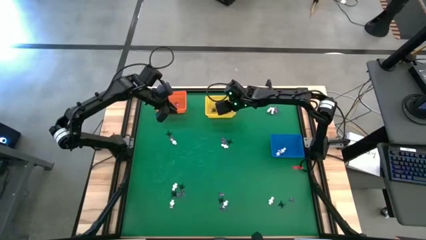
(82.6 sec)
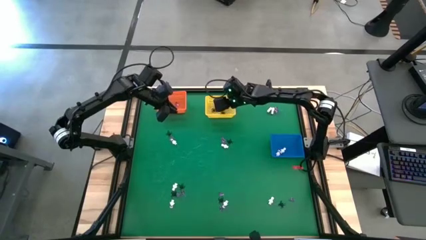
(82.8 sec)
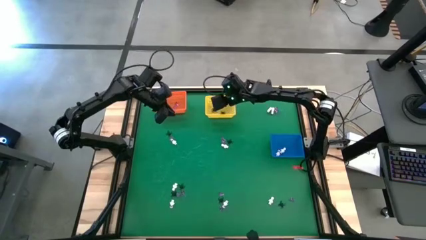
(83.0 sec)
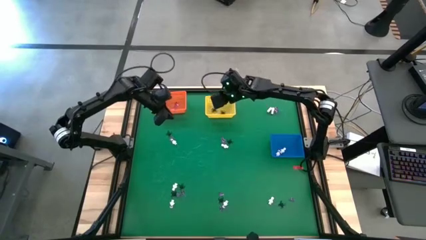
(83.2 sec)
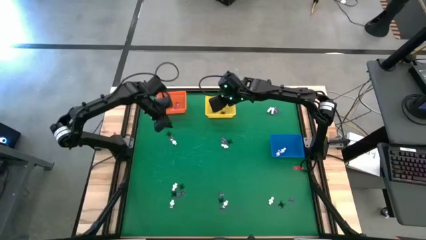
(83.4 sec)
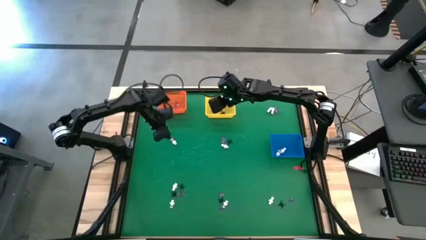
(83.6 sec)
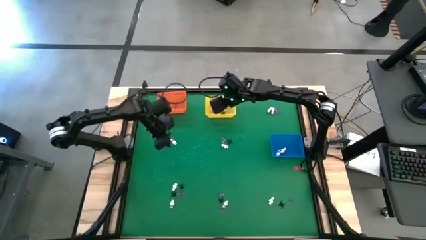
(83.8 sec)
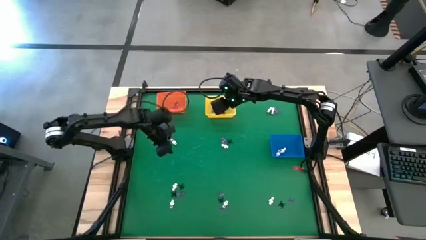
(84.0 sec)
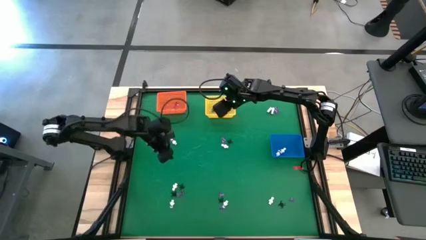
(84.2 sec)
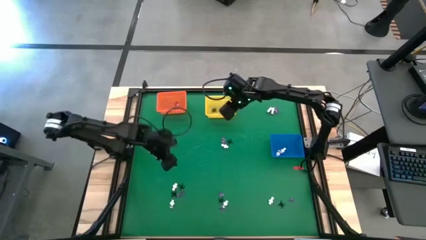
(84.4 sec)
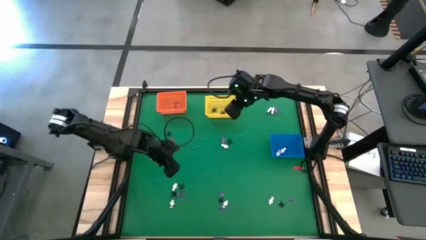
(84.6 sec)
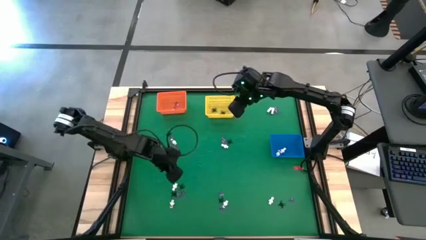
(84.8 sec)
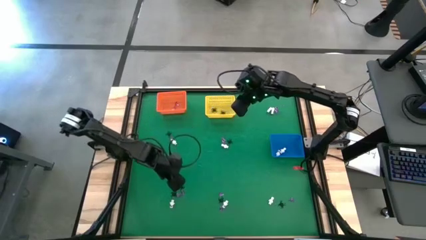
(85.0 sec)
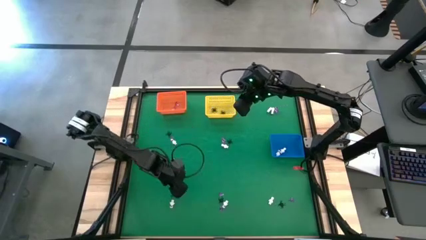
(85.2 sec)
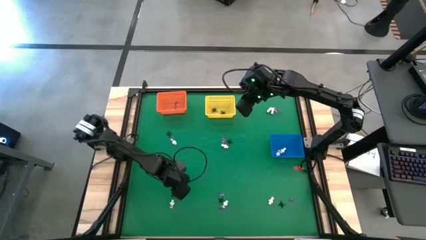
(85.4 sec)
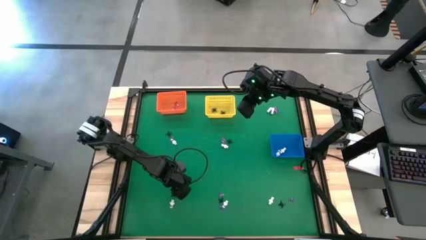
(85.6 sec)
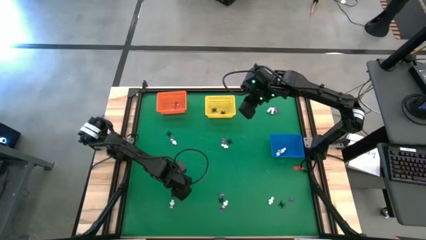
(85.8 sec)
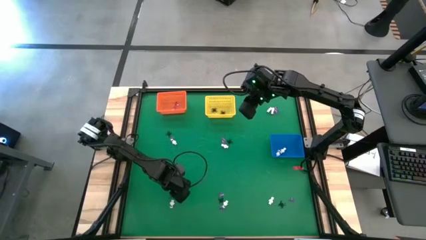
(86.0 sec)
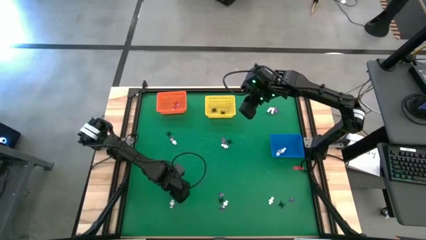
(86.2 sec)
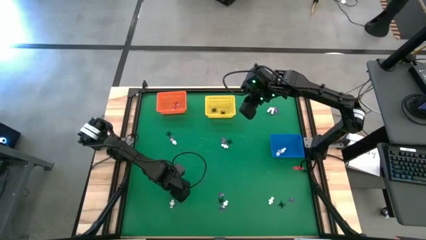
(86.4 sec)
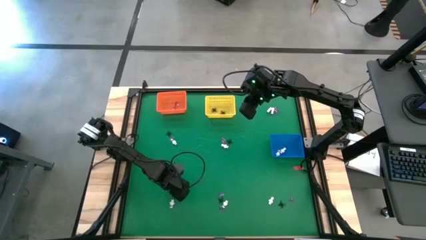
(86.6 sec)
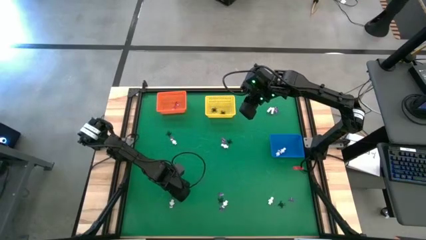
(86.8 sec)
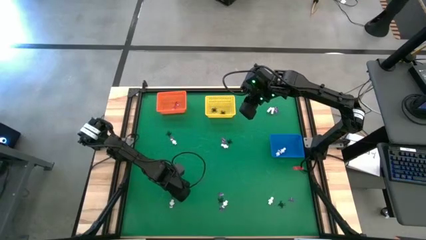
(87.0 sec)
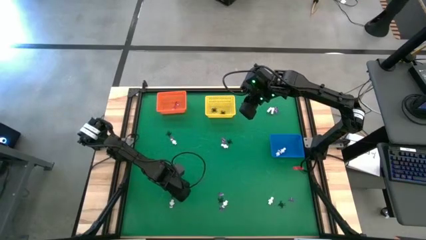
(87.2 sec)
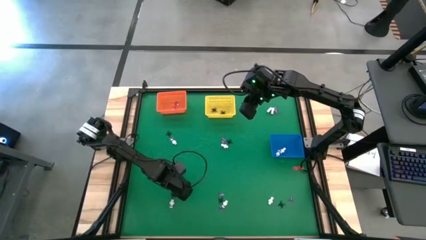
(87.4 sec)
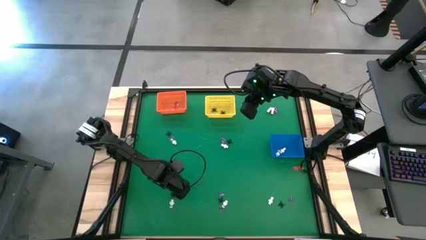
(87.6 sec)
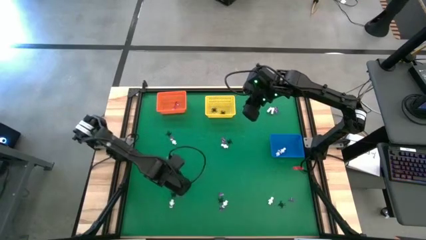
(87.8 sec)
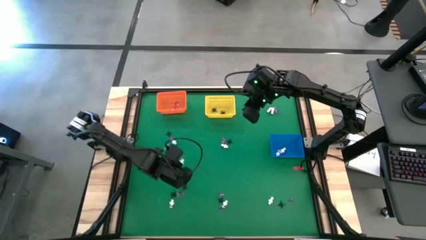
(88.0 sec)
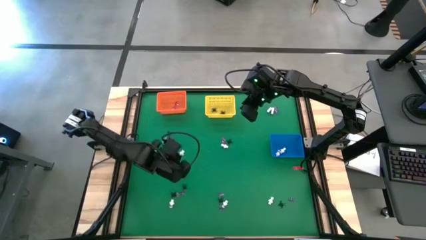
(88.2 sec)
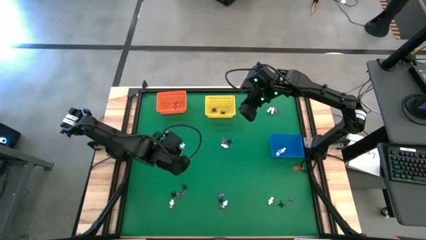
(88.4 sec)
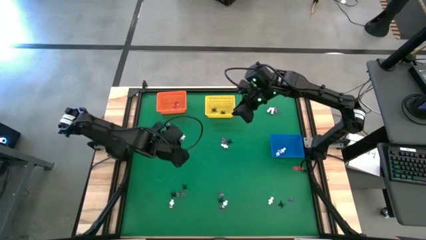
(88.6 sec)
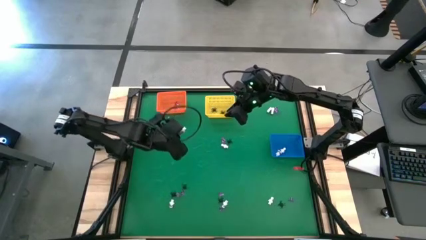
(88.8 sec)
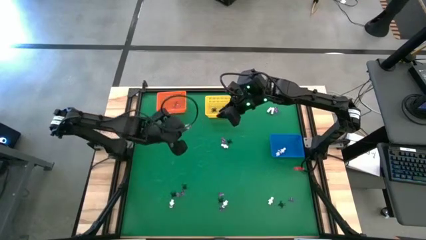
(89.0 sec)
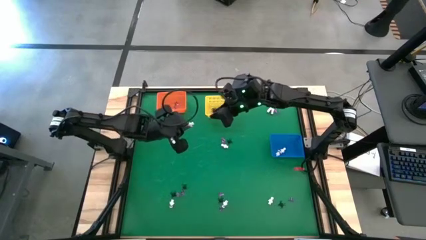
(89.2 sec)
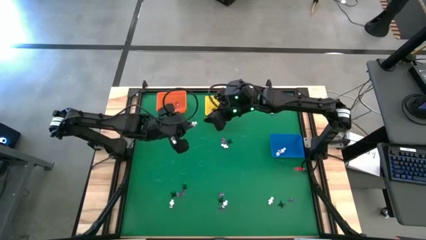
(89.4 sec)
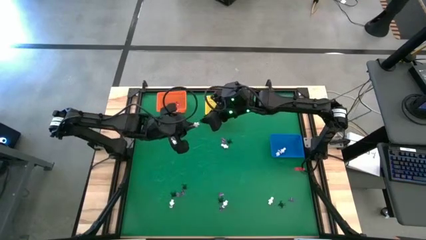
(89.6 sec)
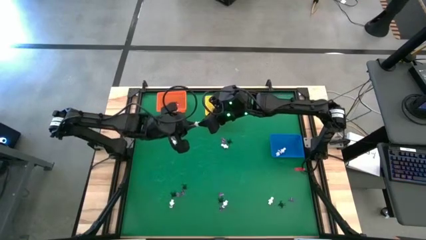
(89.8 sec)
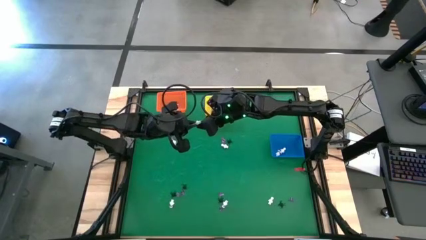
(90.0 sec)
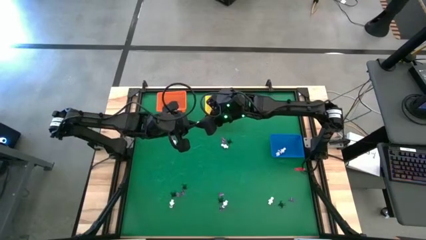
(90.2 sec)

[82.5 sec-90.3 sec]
Task: Sort Halloween decoration
Put the white skeleton toy into the blue basket

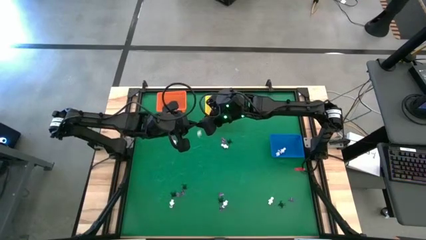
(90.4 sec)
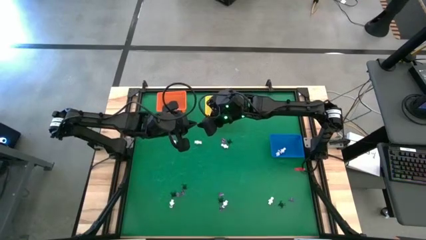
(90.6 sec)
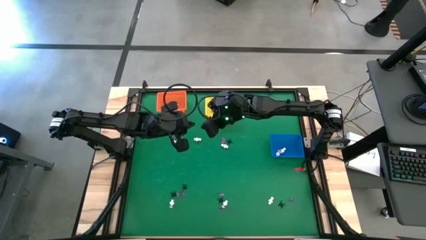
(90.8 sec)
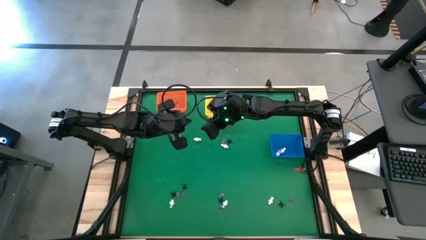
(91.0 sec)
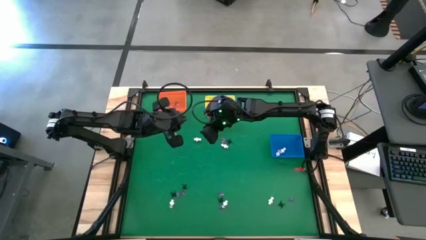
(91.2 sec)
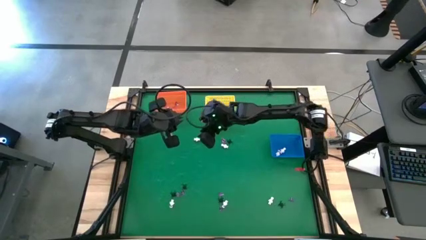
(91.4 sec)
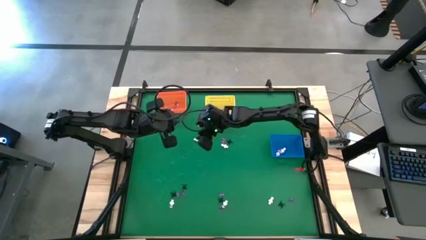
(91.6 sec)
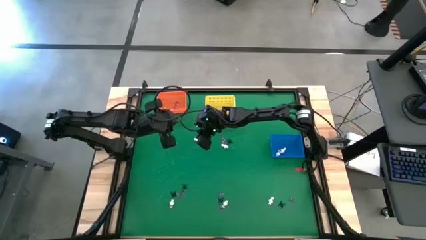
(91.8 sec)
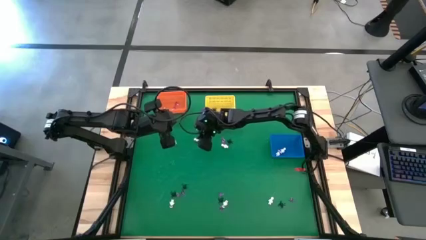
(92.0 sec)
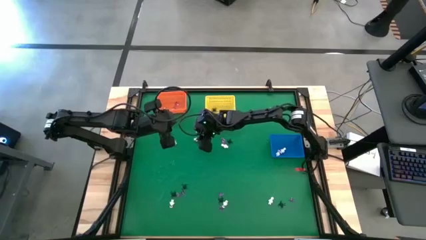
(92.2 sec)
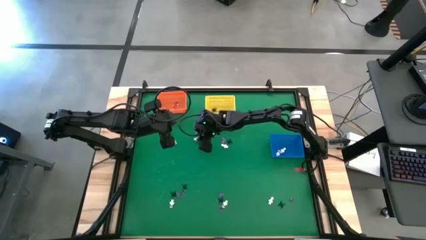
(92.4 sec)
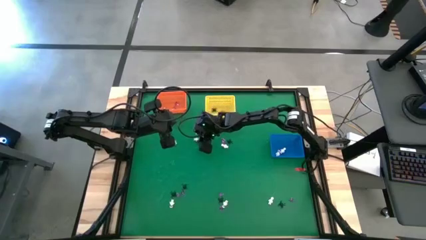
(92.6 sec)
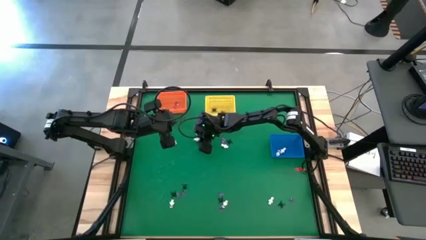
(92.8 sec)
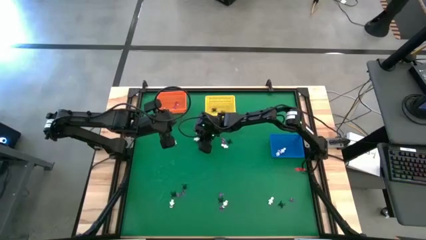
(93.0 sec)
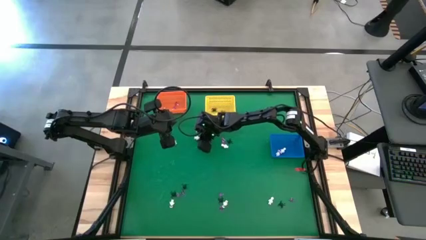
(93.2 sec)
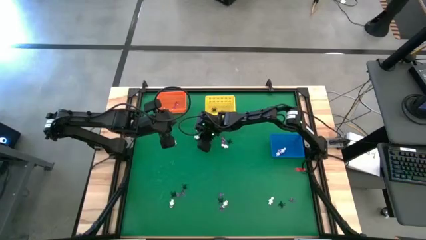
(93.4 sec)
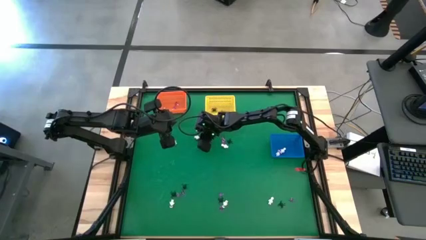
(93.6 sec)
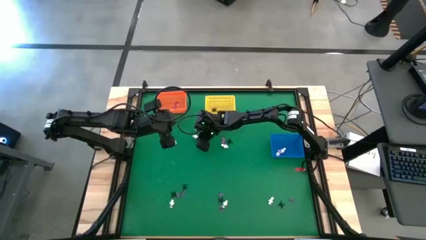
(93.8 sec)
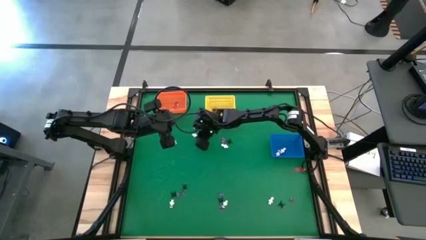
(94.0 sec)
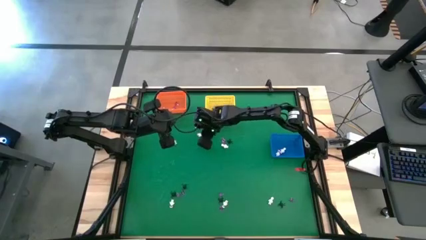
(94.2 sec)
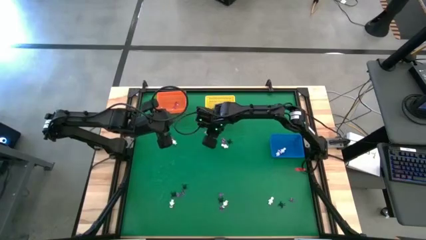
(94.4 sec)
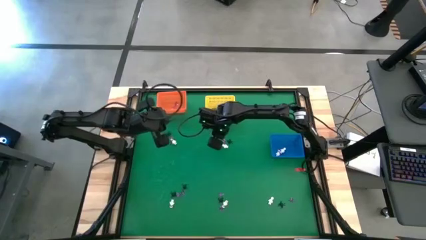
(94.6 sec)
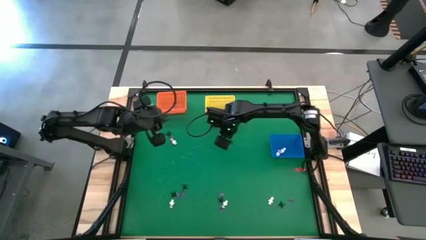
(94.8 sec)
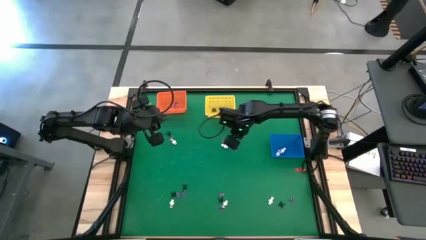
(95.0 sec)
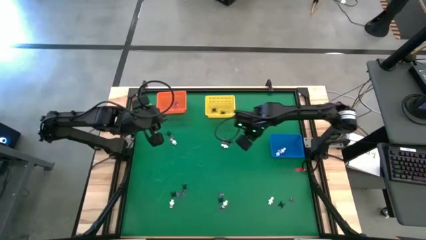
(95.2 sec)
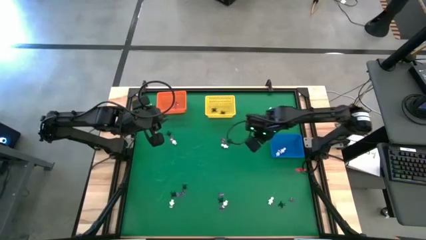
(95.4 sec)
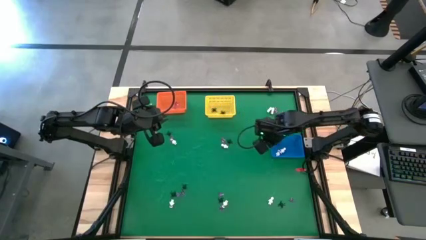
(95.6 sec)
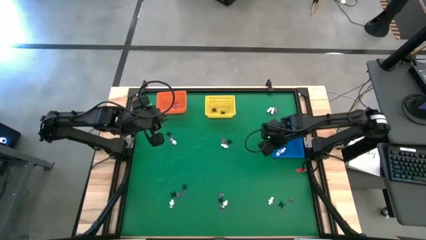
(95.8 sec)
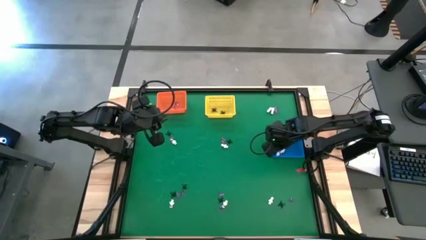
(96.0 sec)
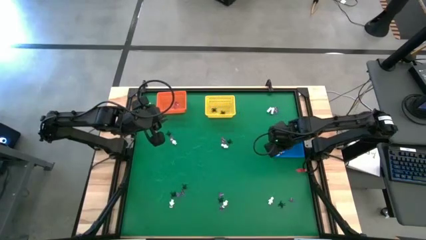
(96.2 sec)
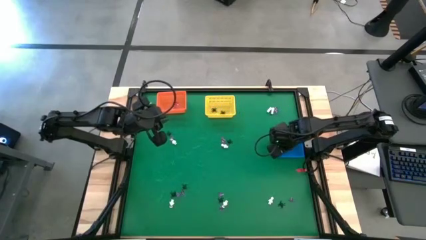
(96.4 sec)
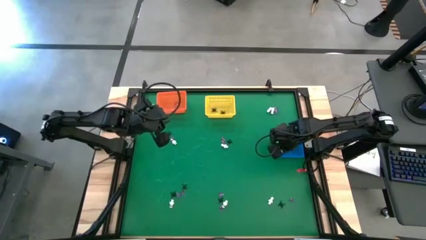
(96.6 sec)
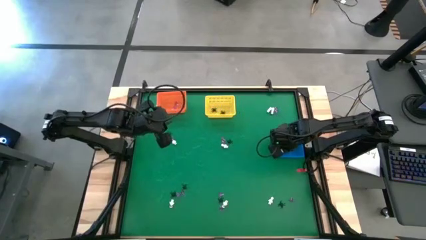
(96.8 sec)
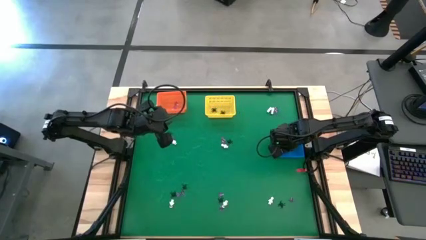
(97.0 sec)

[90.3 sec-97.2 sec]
Put the white skeleton toy into the blue basket

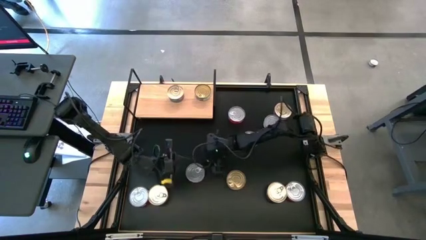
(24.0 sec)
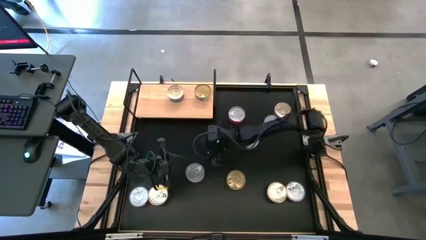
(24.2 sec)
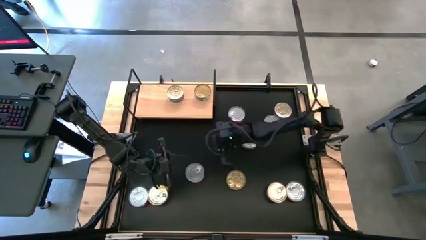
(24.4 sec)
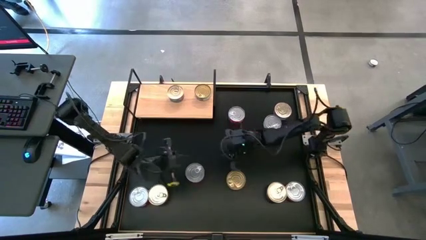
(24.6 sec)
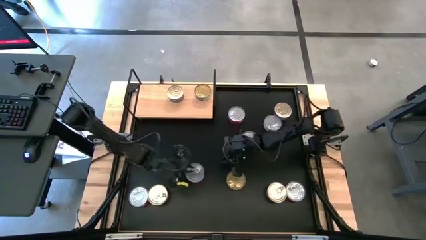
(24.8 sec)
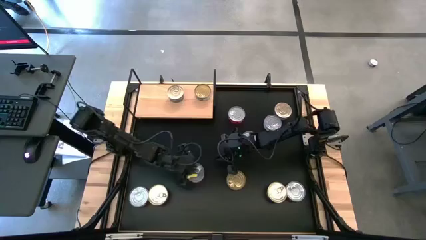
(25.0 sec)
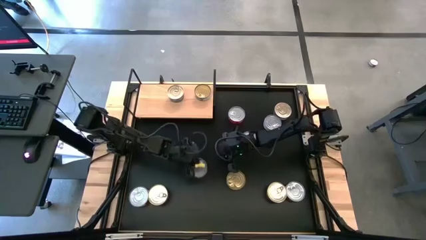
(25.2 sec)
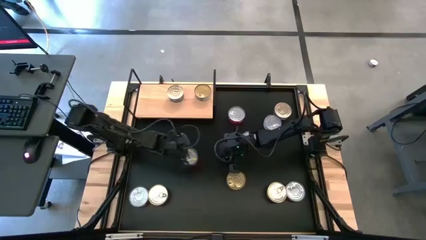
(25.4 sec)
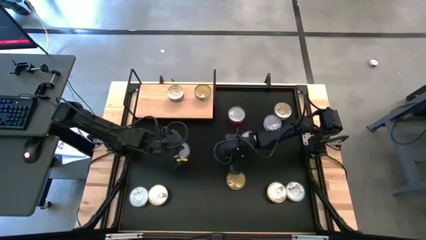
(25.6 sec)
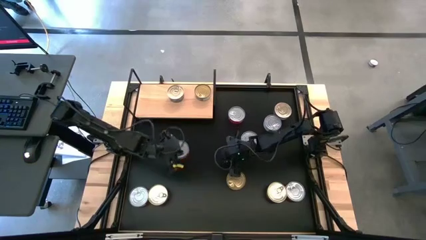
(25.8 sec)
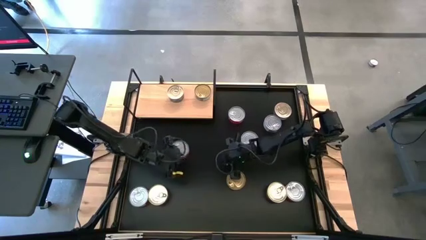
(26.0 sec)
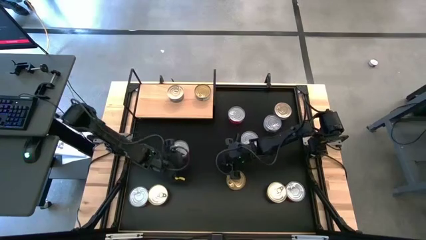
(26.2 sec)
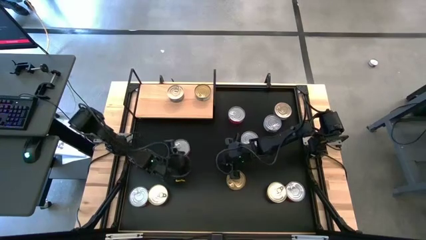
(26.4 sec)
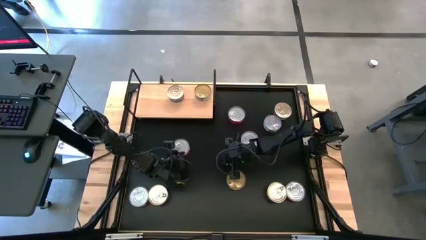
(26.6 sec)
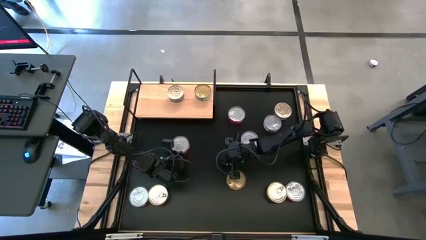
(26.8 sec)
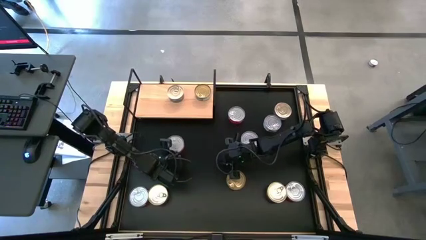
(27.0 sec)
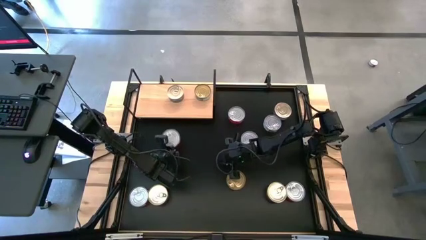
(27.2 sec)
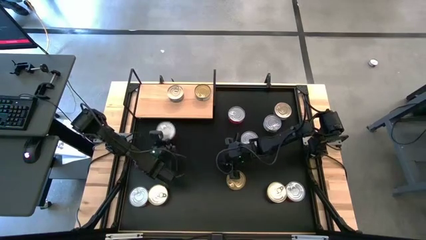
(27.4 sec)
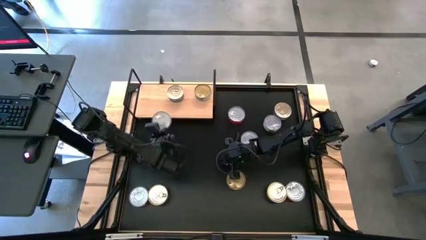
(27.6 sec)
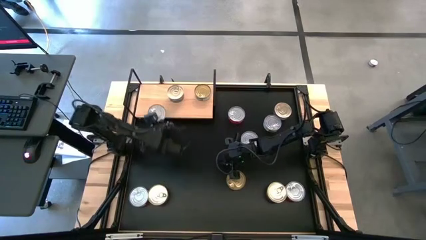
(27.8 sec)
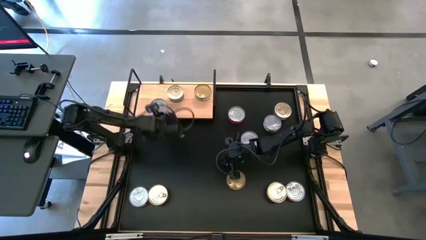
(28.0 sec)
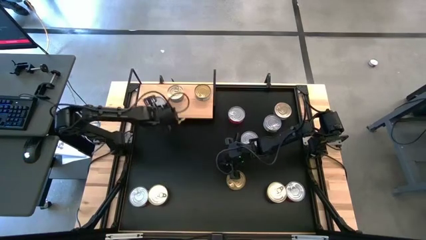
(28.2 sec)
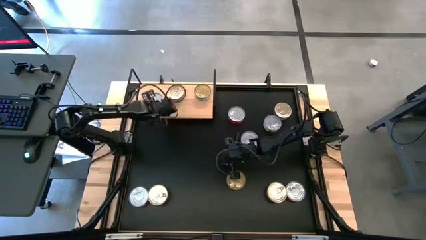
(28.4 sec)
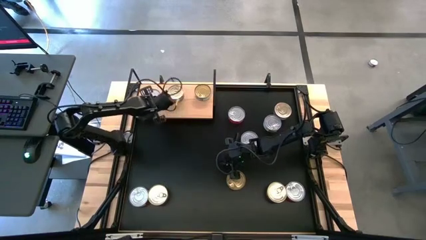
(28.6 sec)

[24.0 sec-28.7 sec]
Task: Stack canned seafood by type on shelf
Put the red tuna can on the shelf
